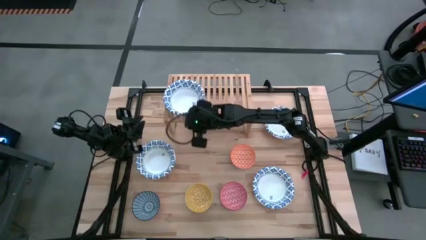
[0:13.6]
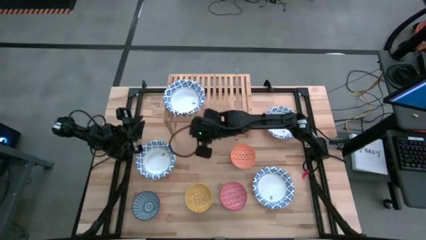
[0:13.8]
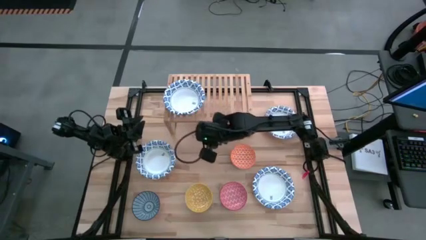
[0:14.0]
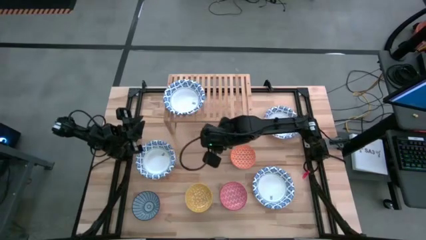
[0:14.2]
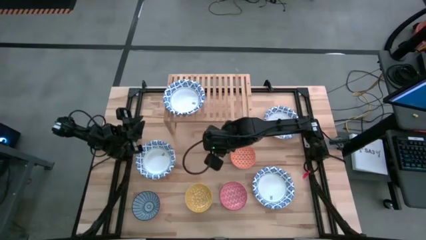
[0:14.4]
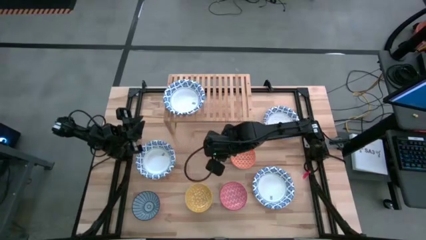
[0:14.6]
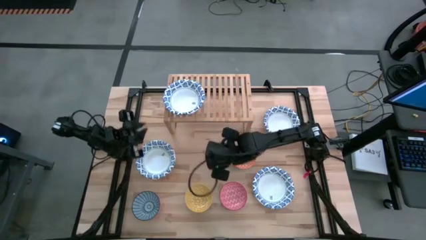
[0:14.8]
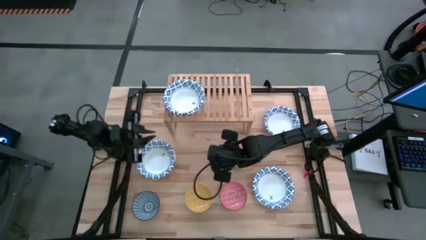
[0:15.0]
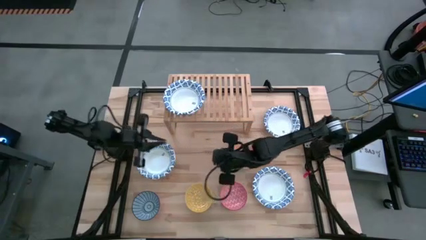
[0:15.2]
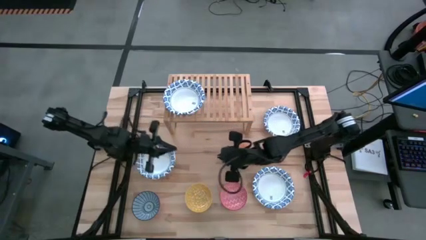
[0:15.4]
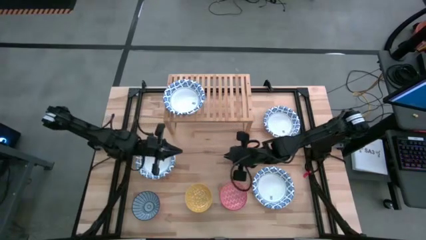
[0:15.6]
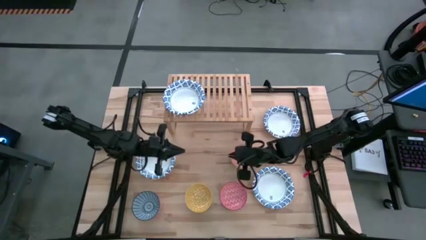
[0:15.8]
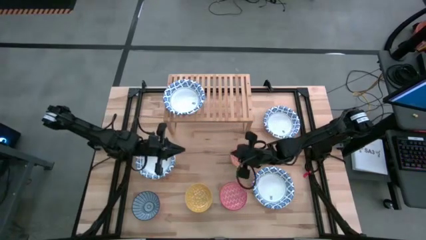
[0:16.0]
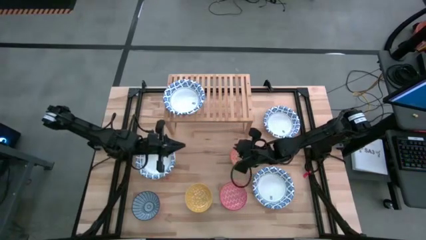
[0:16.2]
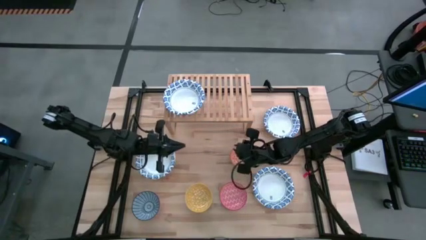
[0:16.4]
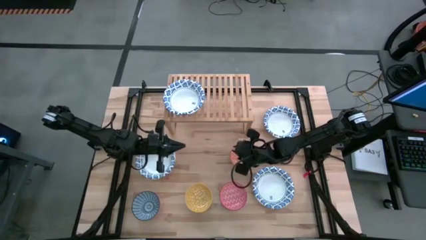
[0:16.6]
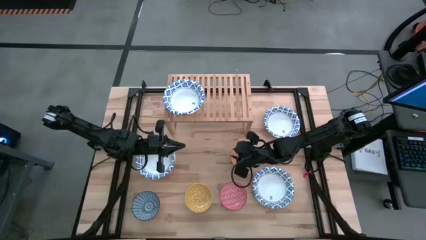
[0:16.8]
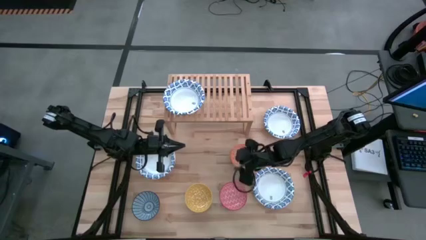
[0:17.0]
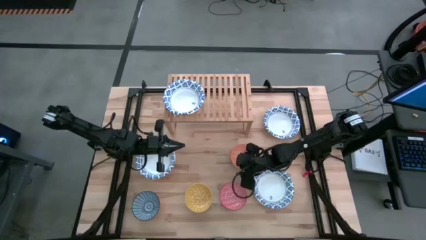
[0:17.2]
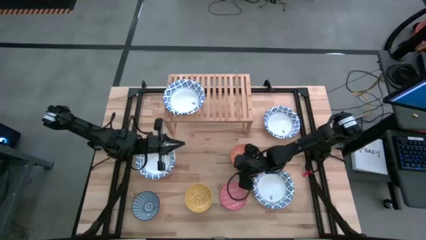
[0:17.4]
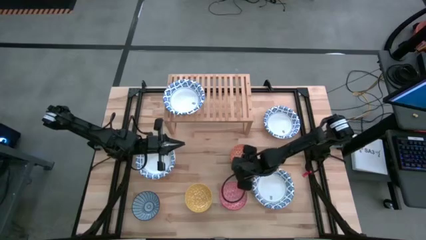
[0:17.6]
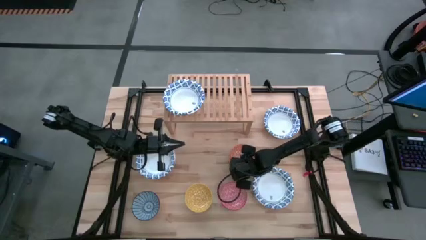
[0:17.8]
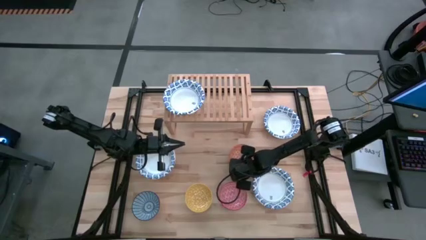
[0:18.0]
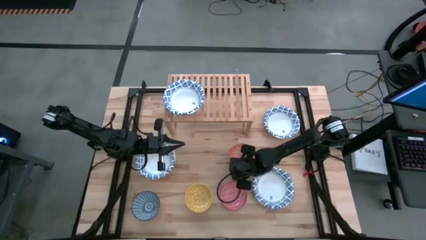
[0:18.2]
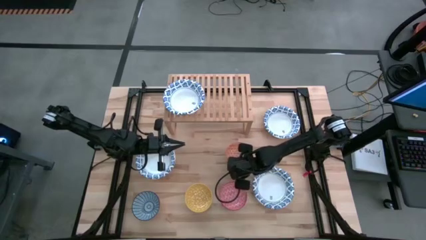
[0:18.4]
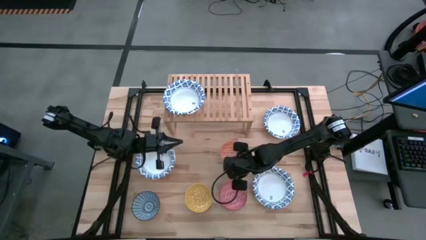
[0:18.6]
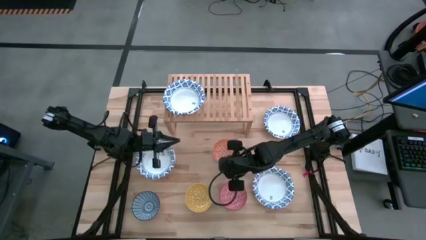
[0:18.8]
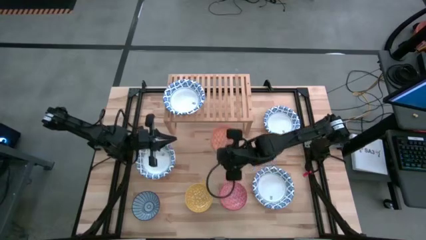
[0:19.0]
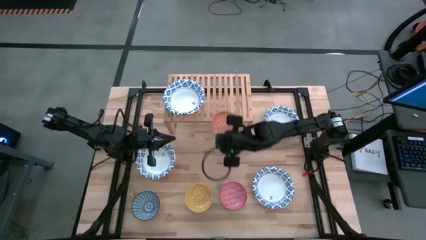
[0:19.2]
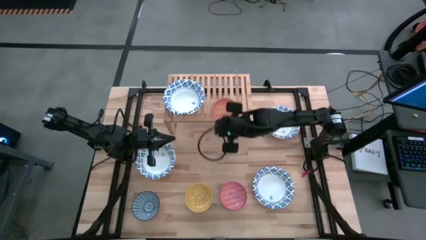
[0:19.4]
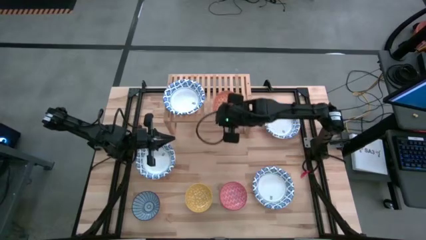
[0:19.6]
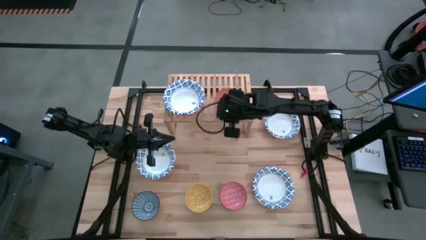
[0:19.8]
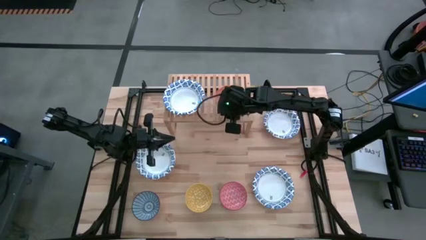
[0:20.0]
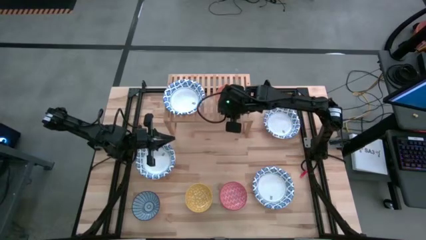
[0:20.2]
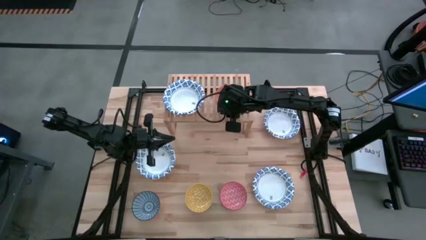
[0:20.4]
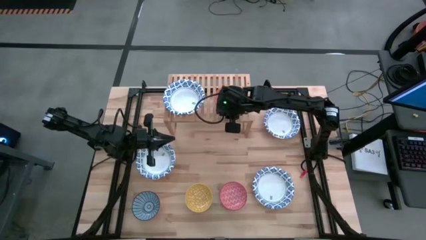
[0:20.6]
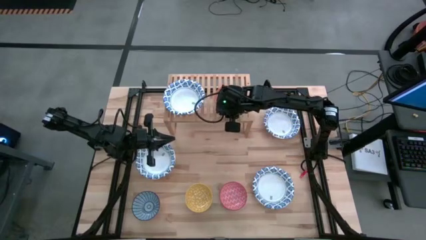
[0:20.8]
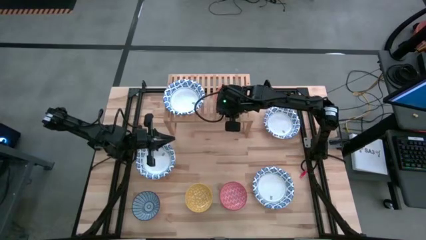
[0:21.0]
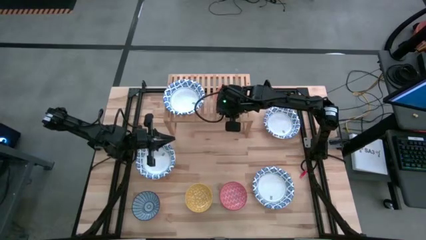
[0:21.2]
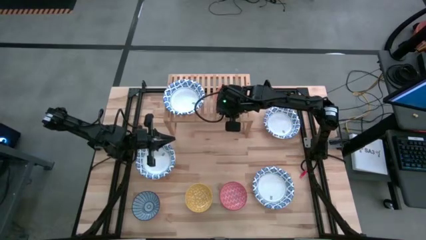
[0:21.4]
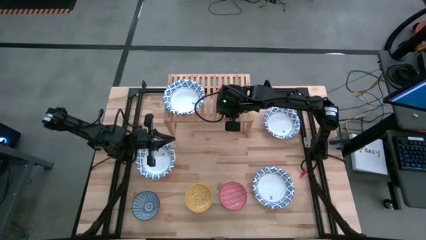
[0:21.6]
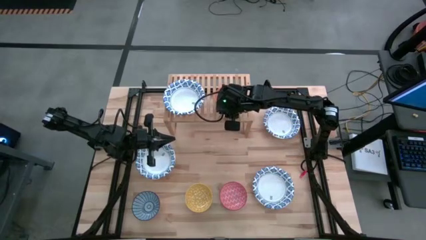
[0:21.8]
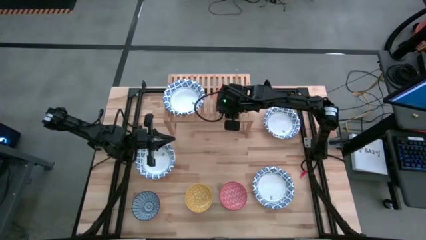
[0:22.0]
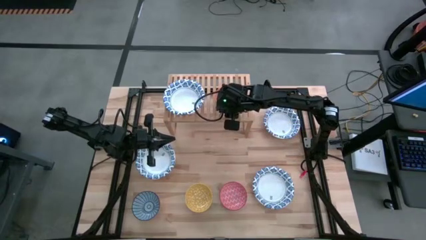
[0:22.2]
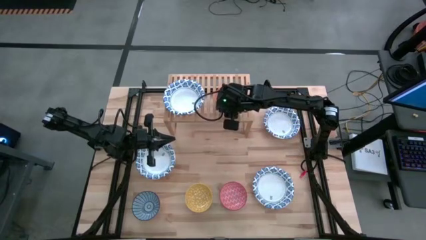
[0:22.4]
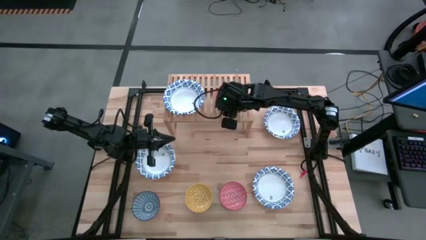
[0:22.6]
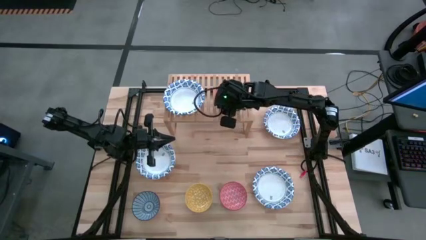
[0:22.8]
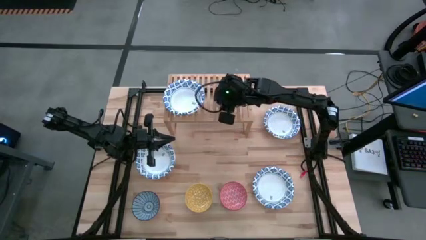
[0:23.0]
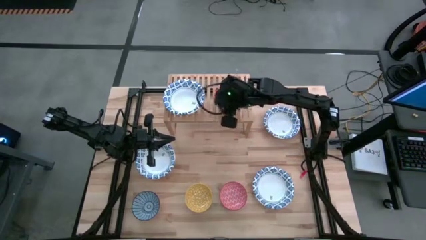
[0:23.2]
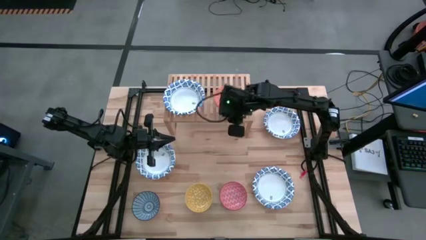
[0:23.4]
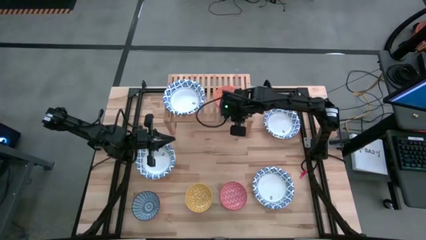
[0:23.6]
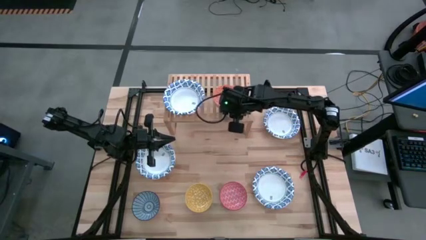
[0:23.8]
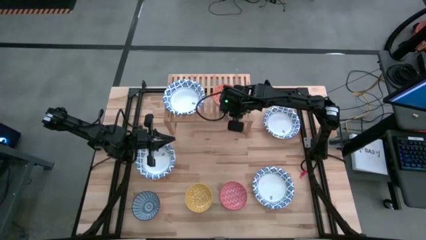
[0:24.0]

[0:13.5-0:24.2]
Task: Place and stack bowls onto a shelf
Put the orange patterned bowl on the shelf

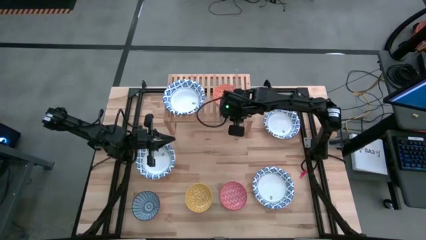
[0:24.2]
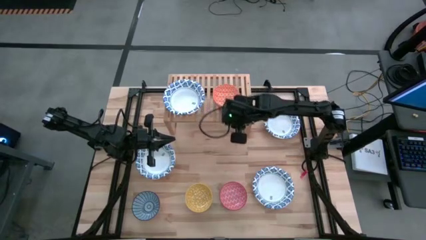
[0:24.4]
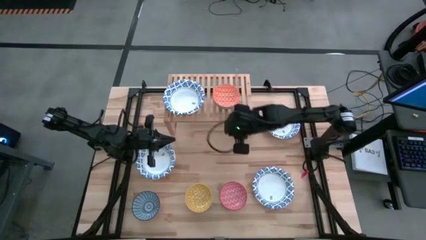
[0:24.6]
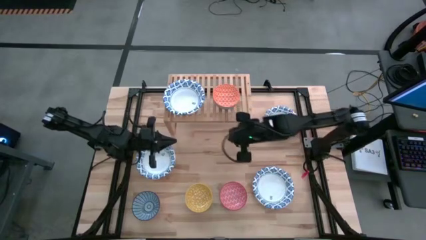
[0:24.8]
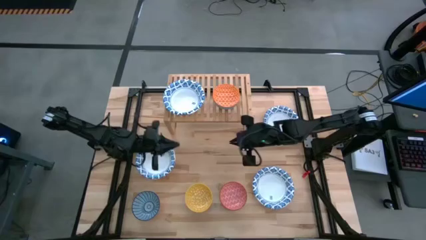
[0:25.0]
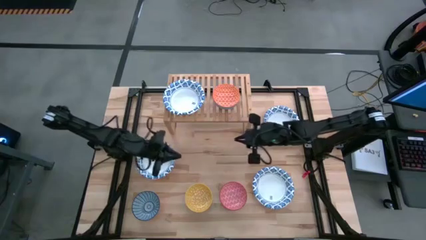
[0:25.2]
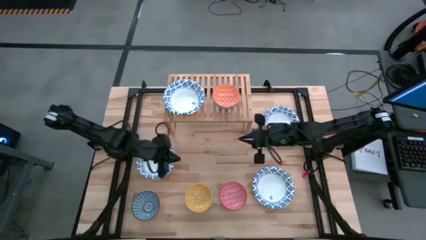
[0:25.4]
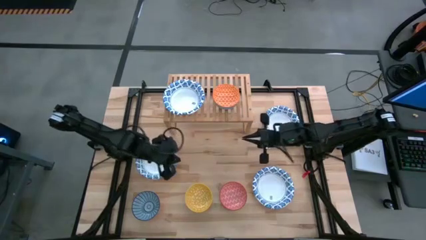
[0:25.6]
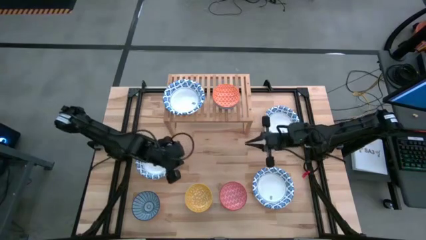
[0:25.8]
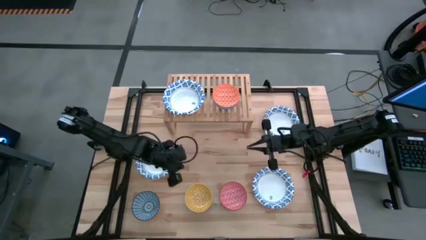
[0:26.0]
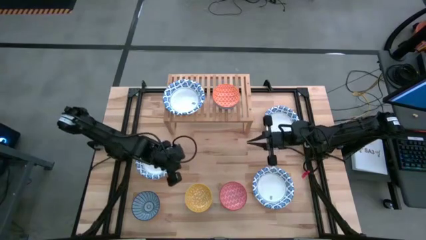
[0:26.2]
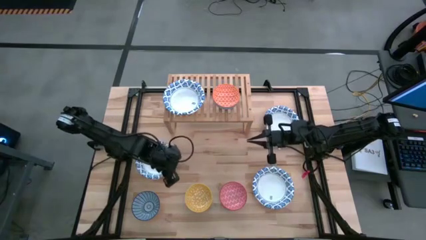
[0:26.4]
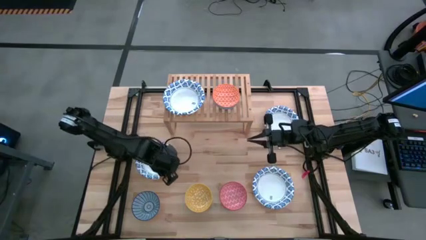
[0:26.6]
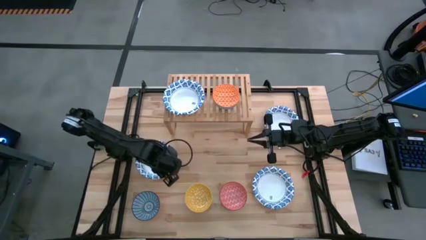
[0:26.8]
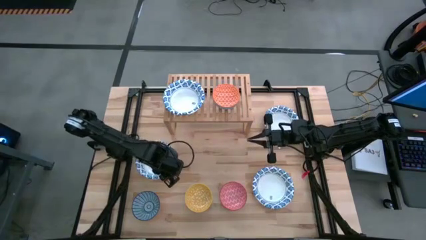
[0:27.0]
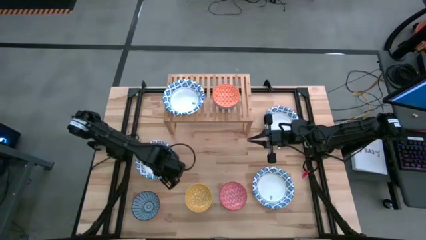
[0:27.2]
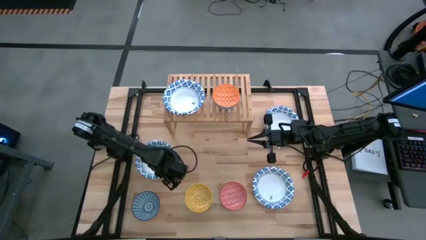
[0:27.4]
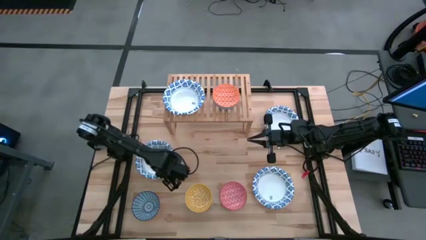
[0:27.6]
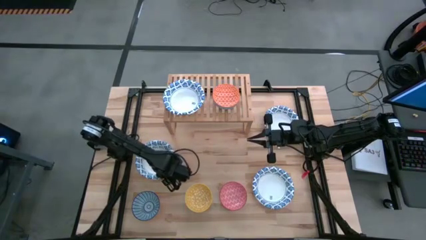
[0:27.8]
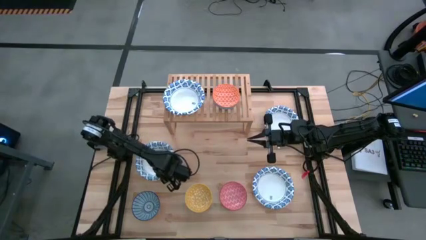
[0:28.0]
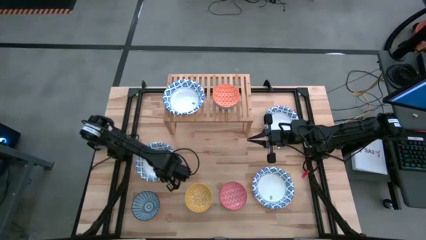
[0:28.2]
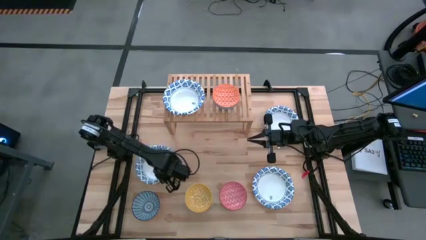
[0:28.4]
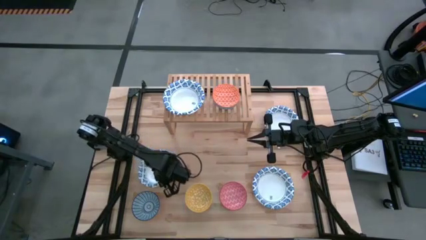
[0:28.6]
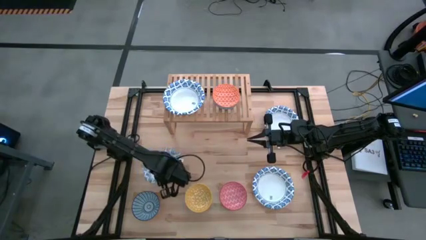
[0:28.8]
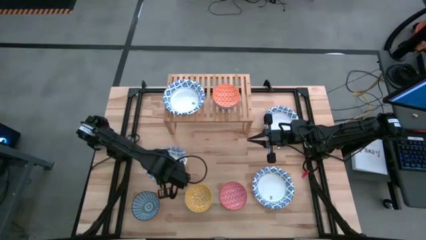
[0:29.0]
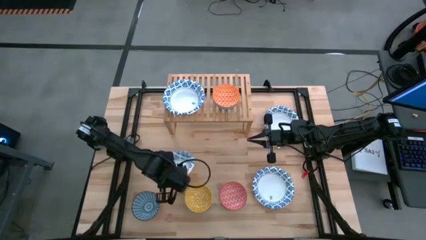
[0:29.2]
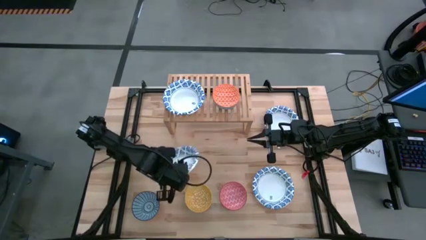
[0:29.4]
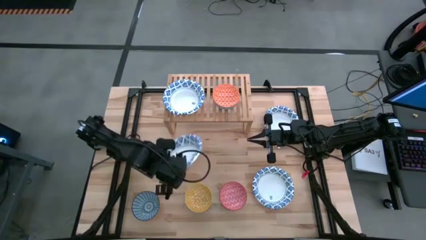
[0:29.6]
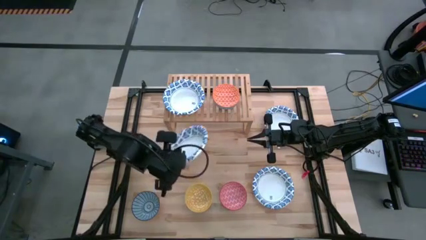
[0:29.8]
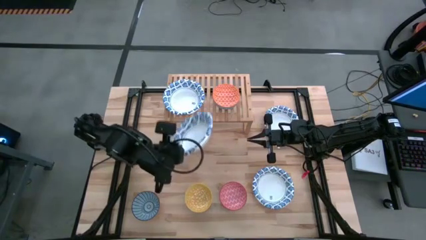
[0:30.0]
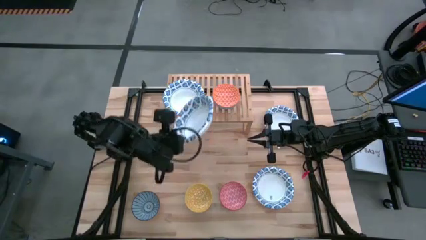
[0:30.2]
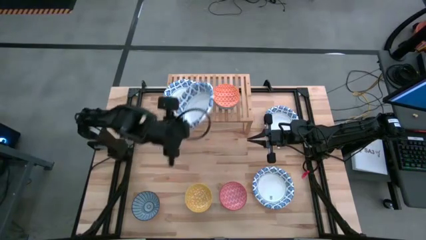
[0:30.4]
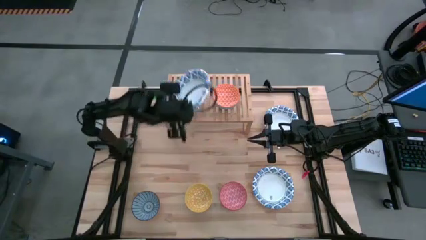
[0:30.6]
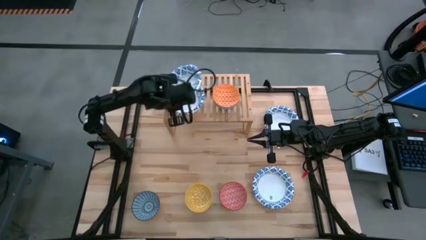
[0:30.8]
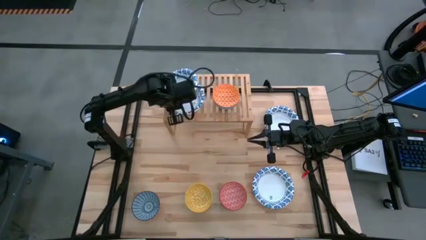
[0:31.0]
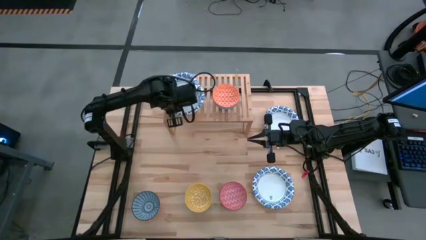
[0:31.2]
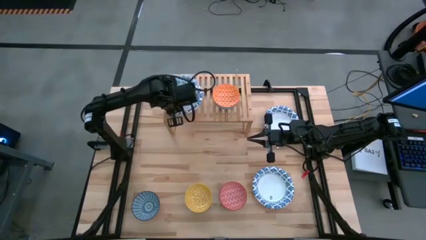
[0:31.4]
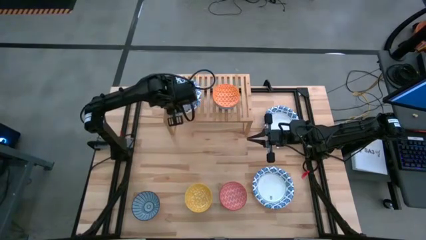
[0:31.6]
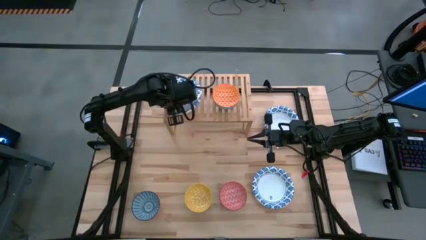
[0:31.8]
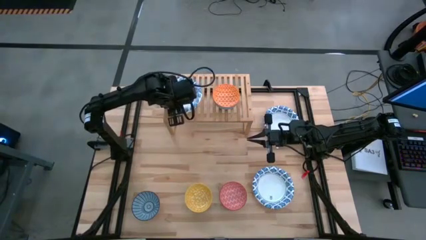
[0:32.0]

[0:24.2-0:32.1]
Stack the white patterned bowl on top of the white patterned bowl on the shelf
